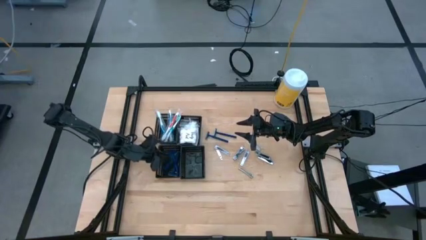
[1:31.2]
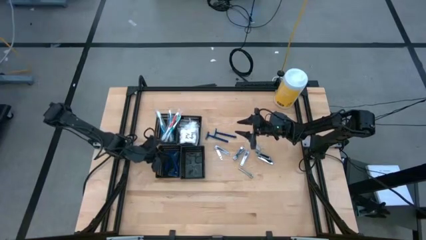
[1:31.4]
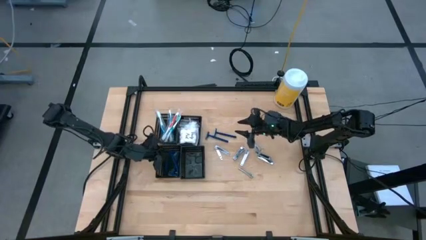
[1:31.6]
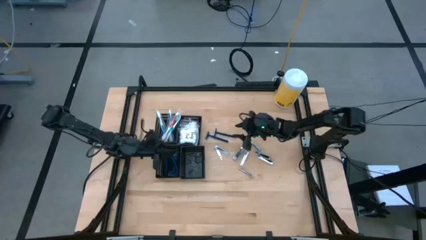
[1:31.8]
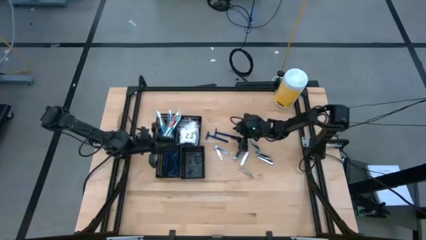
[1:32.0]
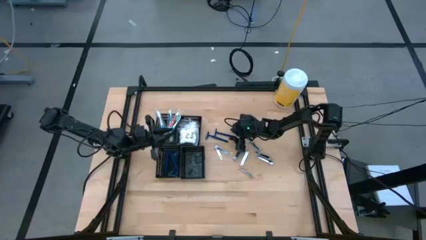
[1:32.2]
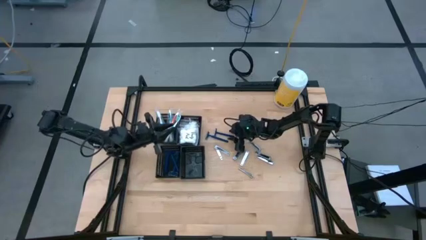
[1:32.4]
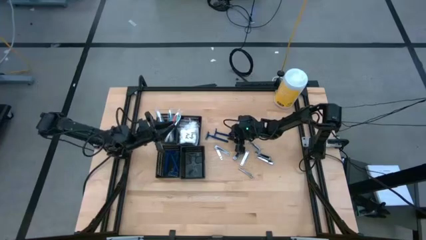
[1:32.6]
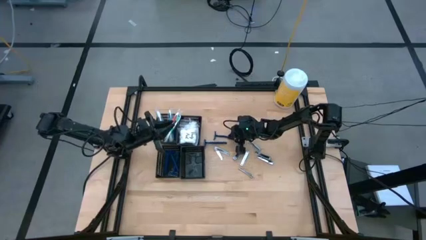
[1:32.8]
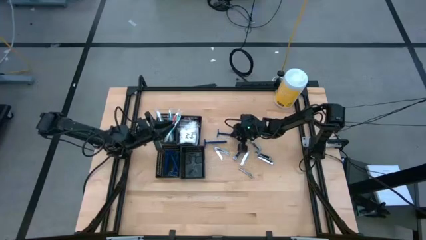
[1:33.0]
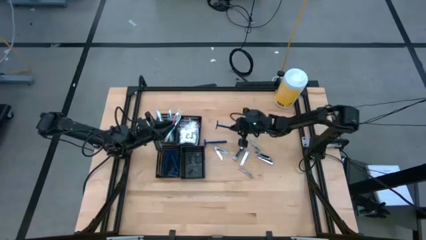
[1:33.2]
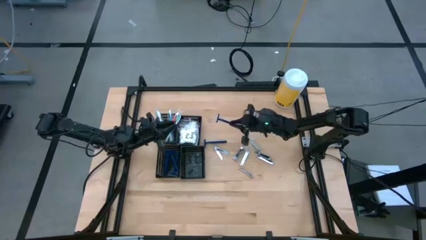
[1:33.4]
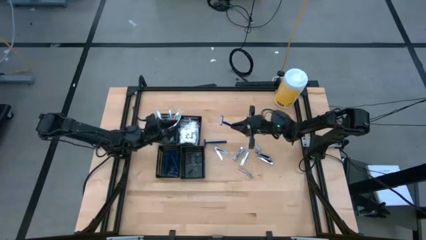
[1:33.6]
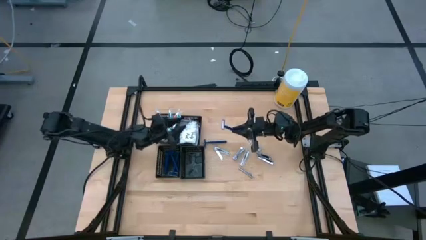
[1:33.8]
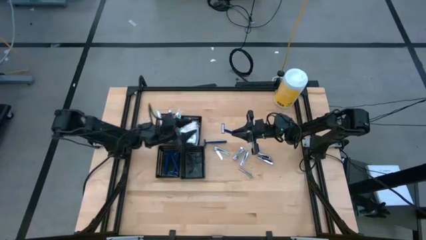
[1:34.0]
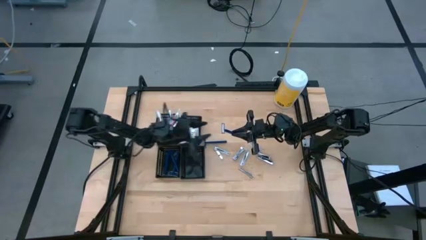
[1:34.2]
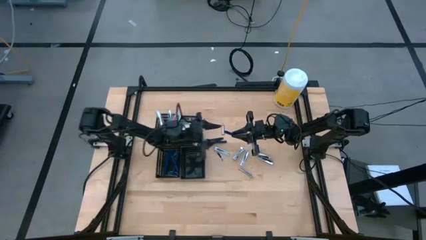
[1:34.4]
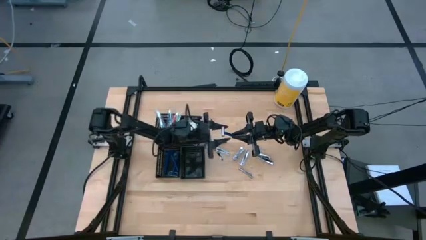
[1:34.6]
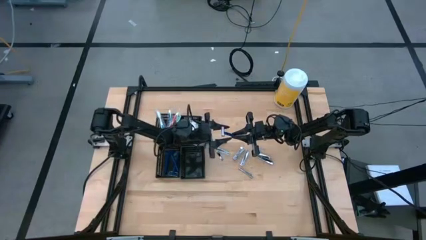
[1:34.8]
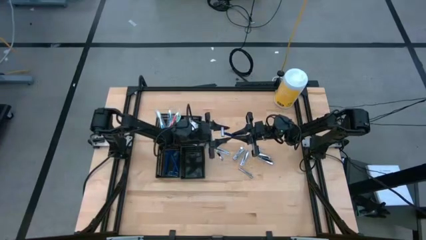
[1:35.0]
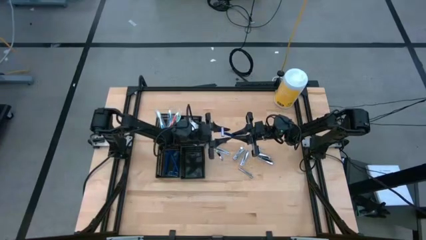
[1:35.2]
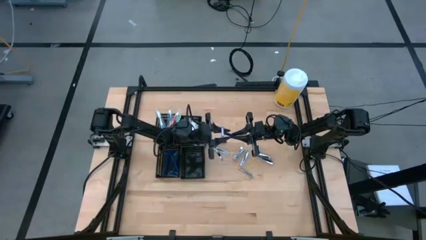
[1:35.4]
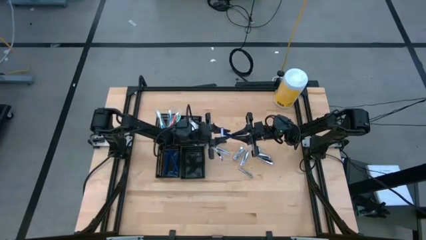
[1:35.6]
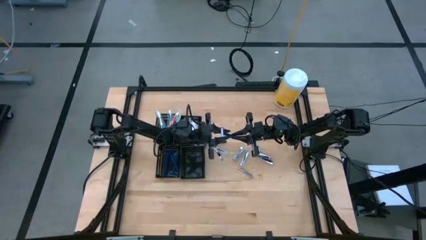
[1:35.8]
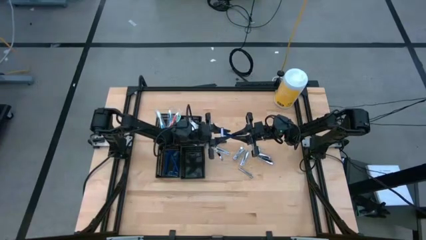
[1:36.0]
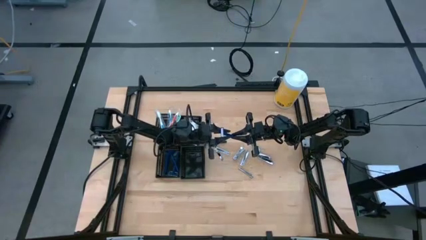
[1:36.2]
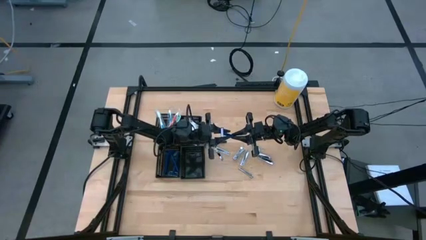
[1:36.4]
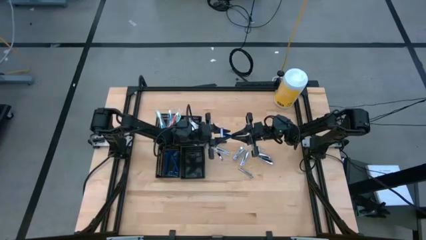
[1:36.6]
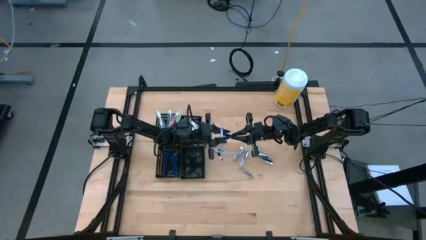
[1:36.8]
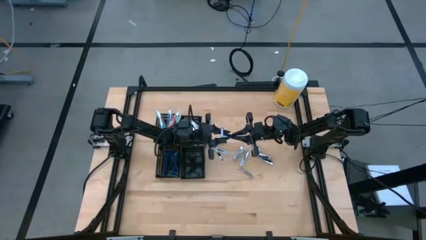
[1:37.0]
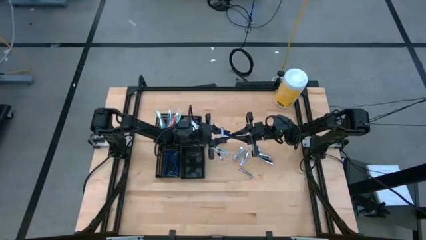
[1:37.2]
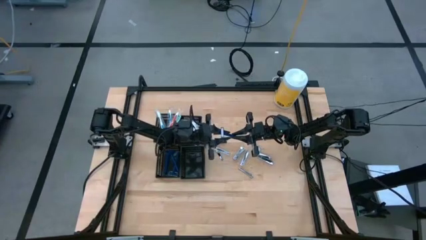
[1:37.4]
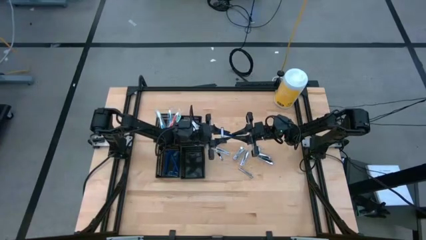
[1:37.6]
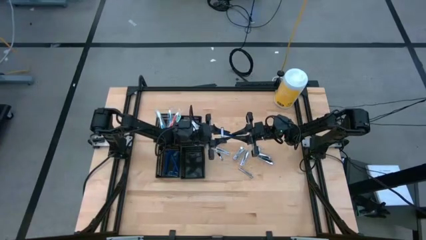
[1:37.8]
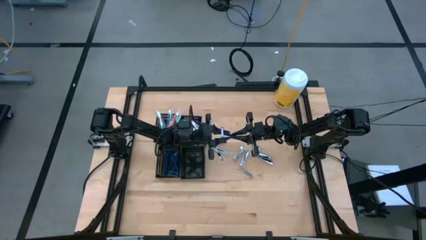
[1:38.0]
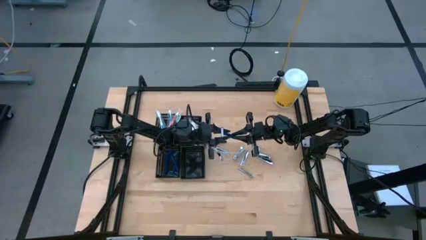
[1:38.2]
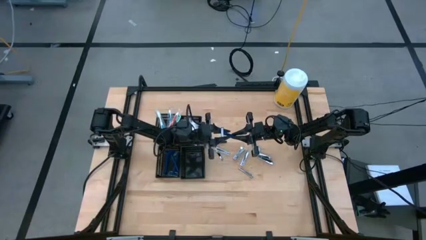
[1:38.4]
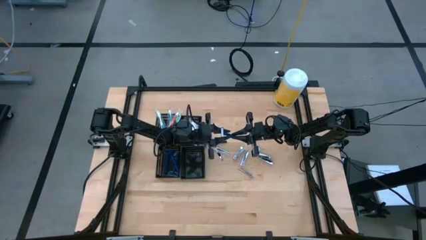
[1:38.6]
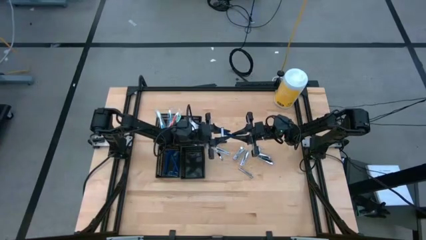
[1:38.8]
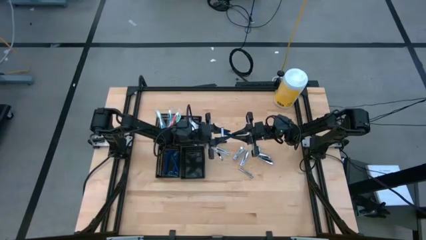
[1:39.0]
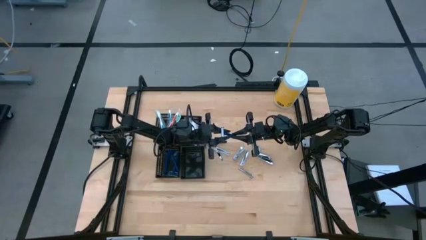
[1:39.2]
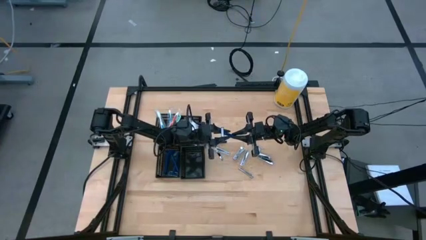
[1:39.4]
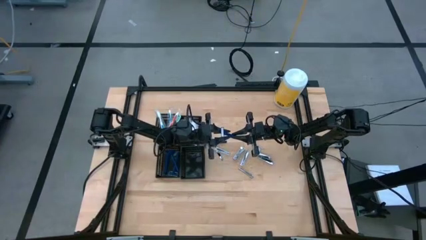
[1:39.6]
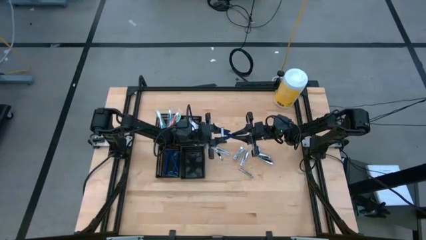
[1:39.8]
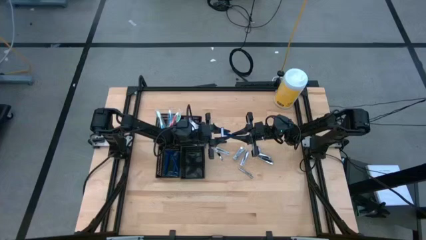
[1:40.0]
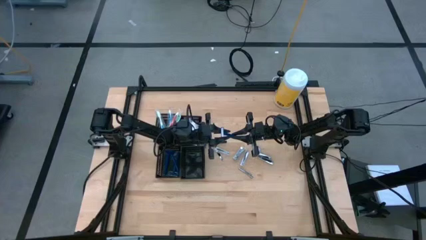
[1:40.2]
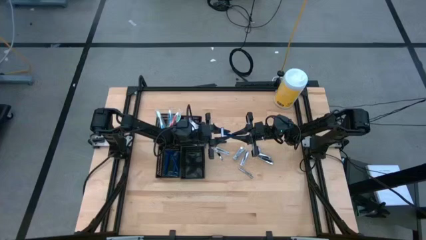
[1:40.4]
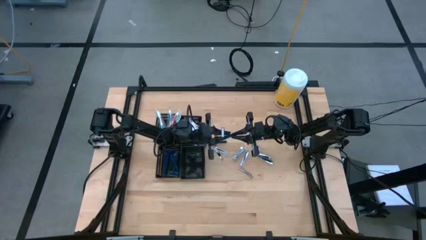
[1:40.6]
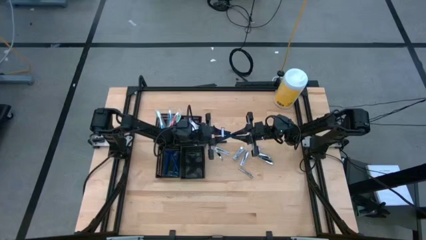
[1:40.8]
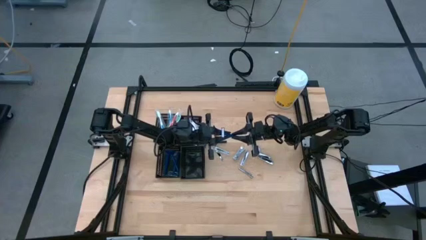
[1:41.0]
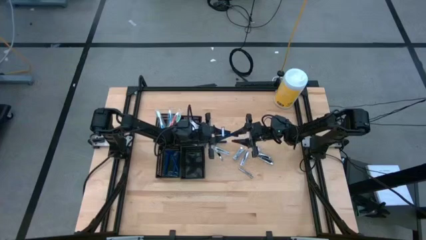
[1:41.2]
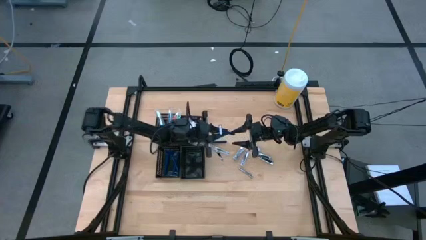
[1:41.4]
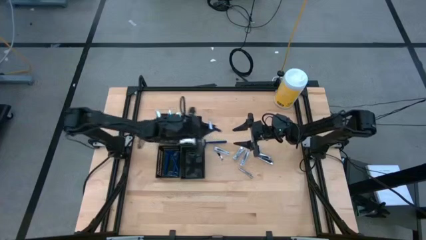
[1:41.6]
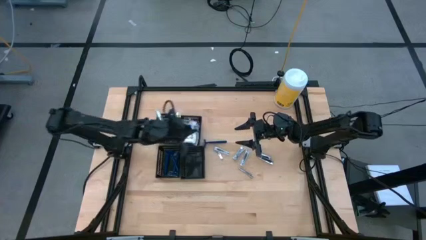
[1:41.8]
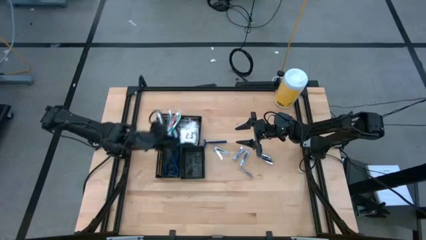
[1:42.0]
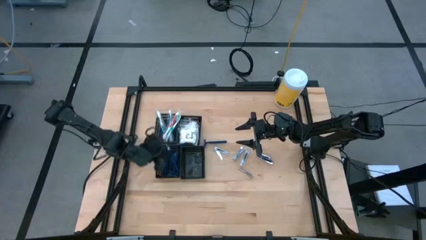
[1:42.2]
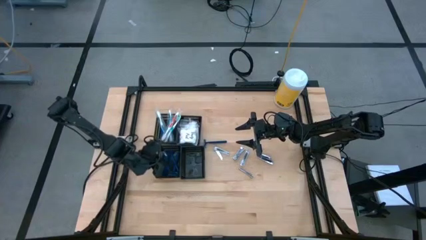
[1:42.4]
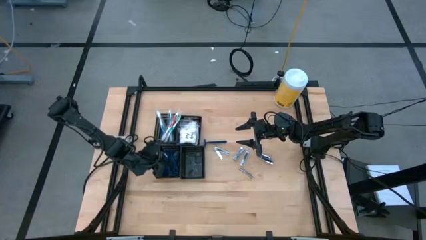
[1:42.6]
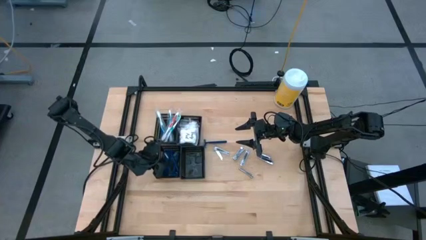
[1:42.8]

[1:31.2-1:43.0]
Task: Pick & Place Travel size toiletries
Put the blue razor into the bottom left black bin

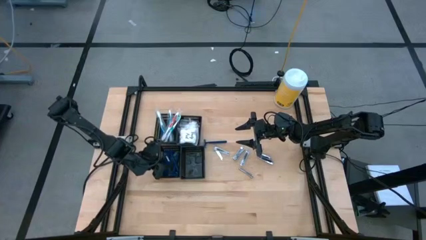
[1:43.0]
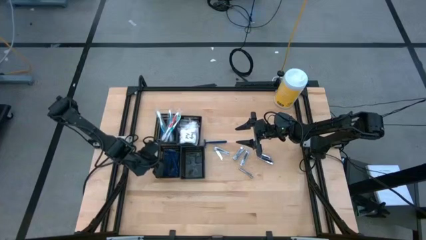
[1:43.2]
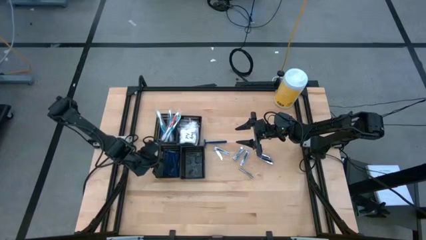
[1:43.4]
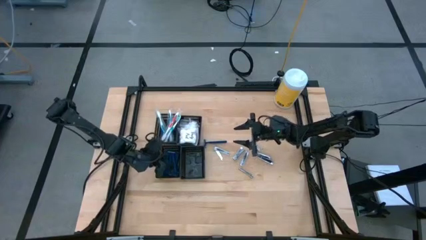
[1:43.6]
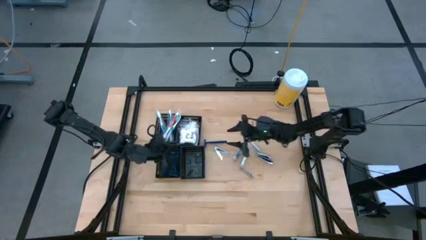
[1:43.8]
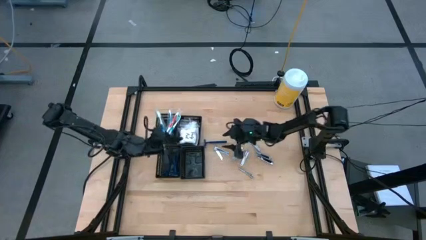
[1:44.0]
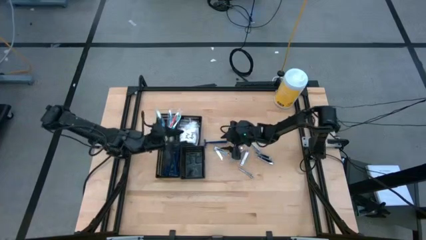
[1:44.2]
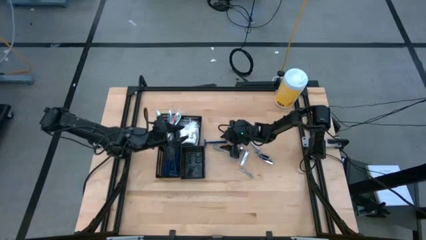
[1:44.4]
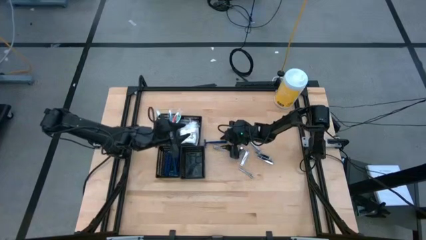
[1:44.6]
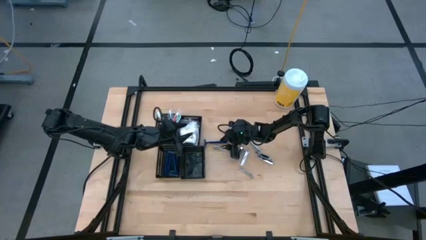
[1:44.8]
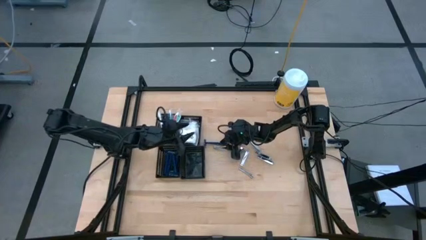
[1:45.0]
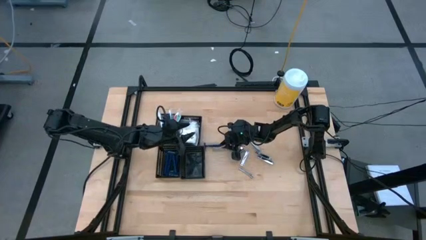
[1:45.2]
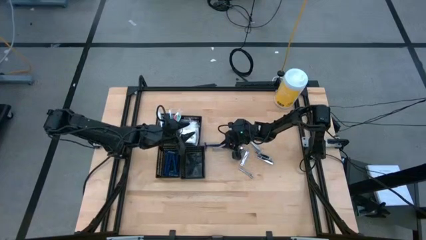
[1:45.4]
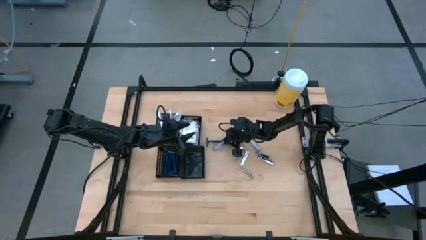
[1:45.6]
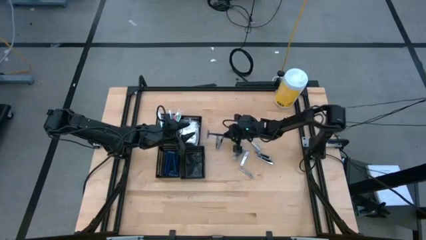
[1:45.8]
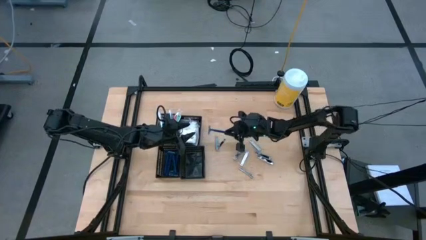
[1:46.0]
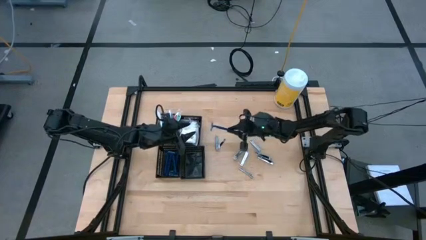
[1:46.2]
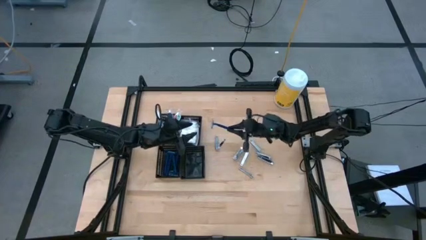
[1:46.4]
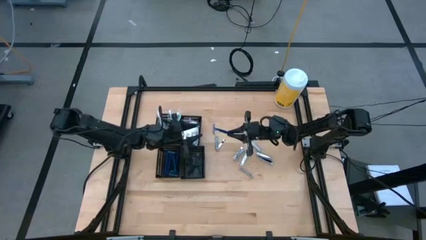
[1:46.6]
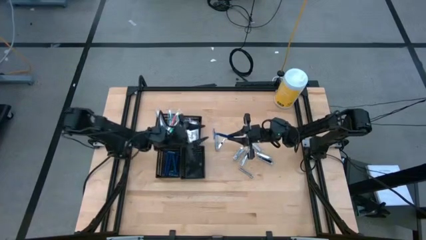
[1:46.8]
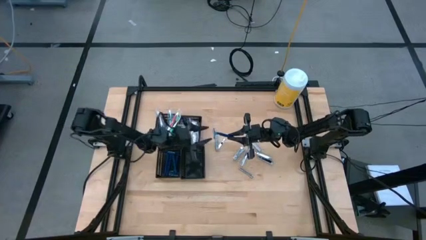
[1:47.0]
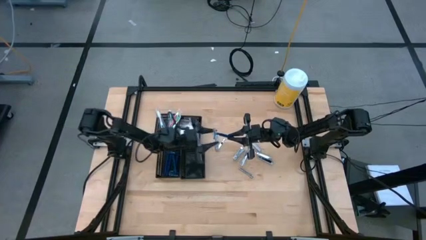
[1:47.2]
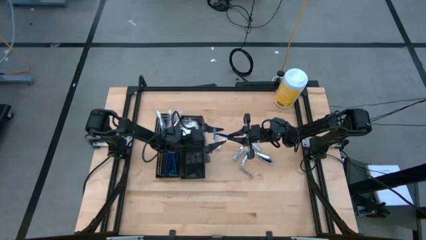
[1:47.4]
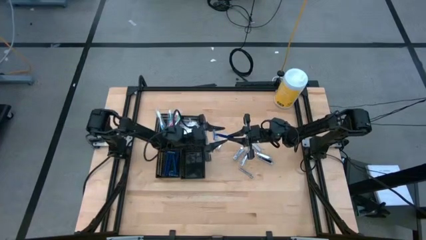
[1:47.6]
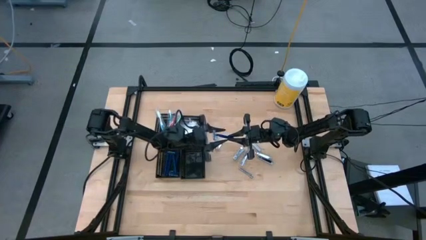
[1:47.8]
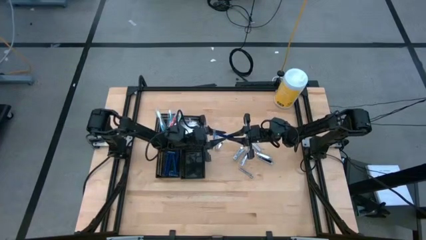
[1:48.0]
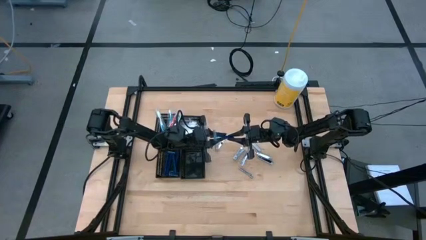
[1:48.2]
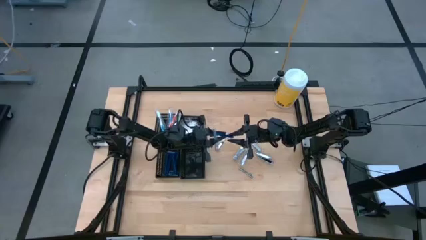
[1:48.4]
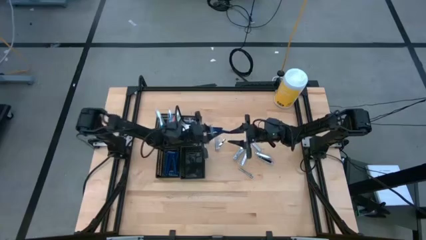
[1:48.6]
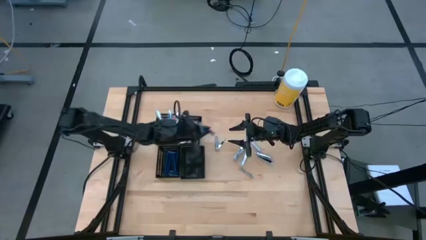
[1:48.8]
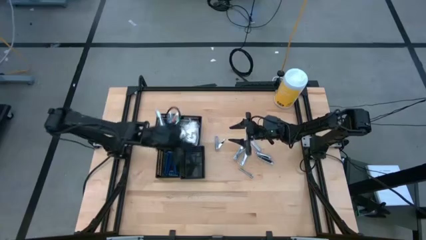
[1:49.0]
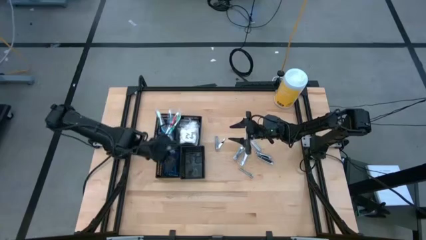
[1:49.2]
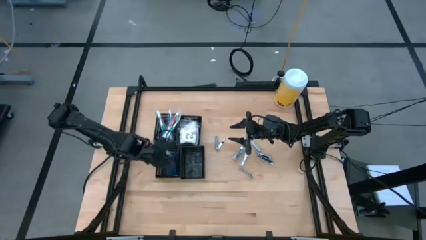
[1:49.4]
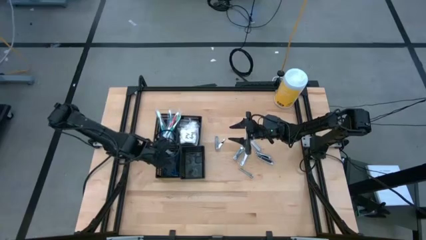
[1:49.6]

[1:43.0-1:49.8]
Put the blue razor into the bottom left black bin
